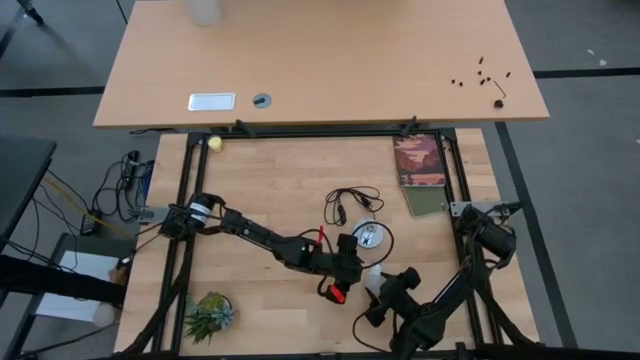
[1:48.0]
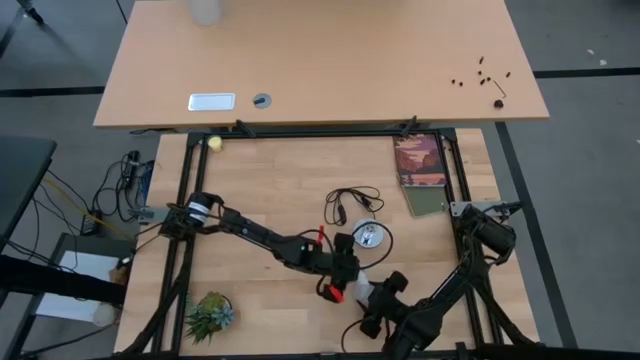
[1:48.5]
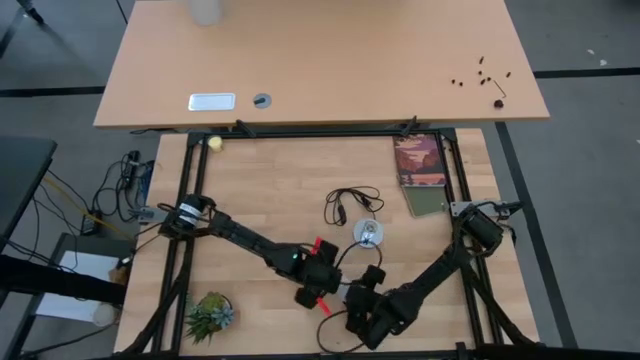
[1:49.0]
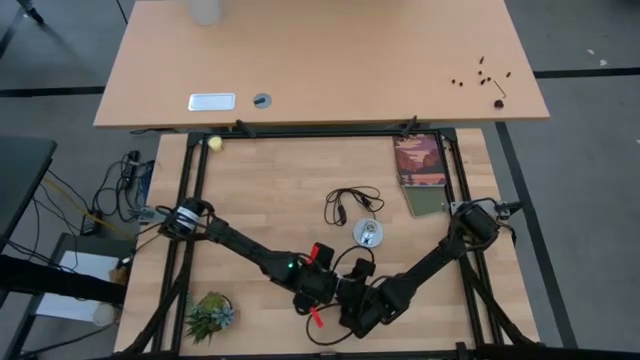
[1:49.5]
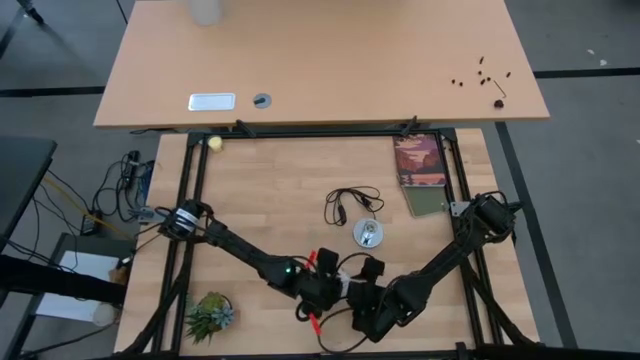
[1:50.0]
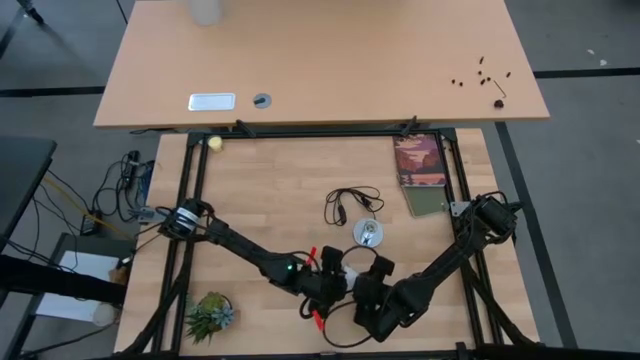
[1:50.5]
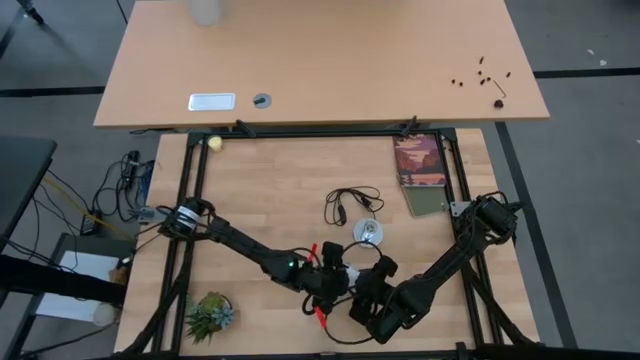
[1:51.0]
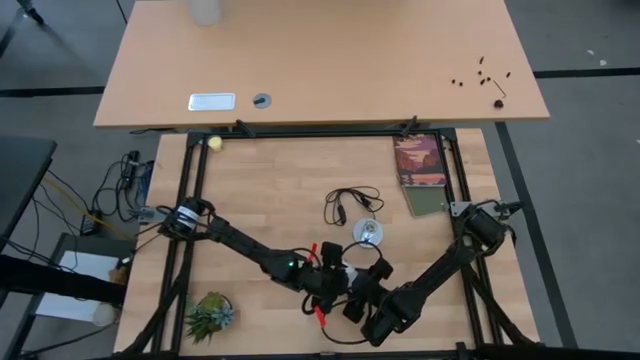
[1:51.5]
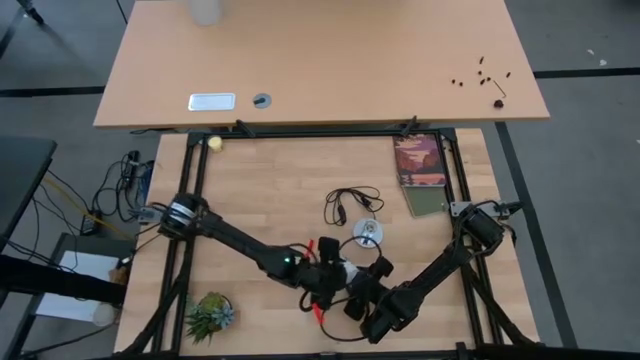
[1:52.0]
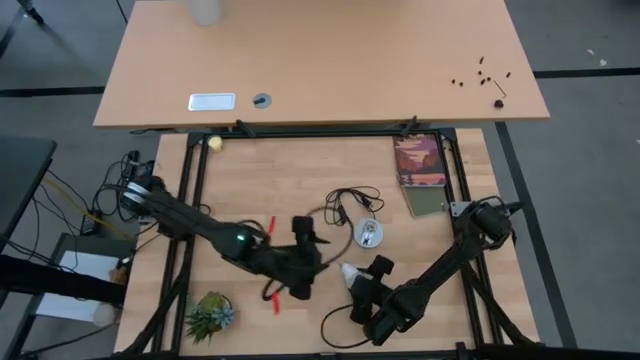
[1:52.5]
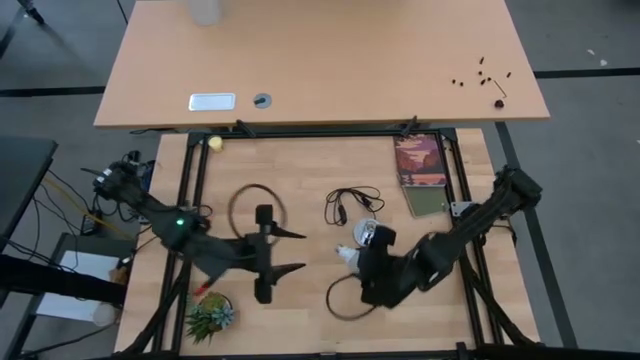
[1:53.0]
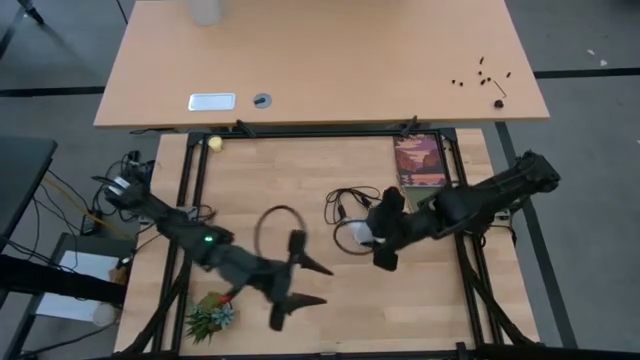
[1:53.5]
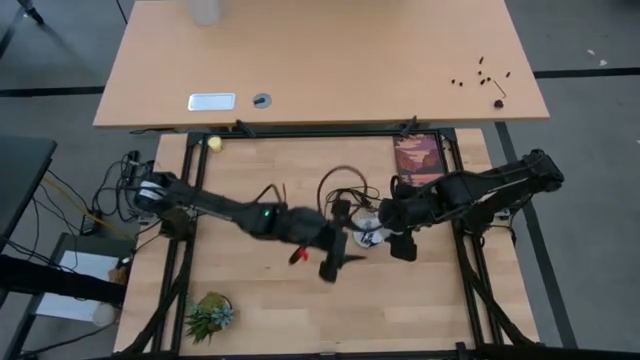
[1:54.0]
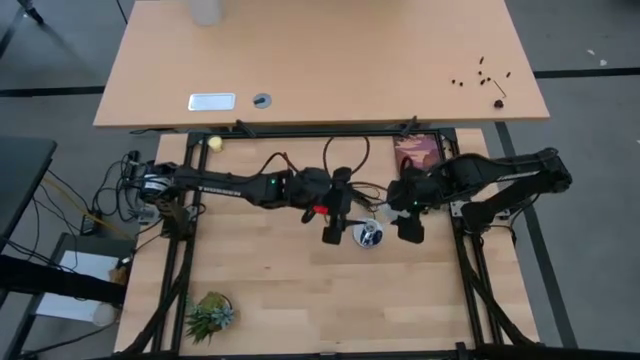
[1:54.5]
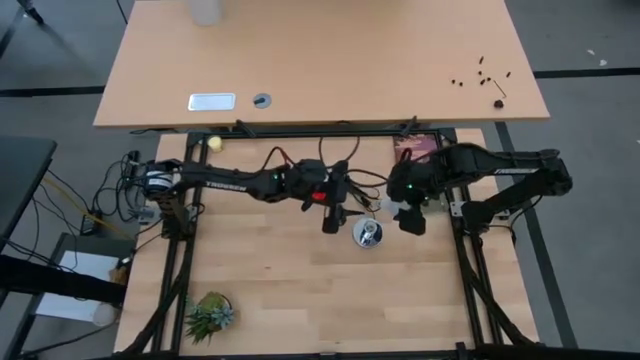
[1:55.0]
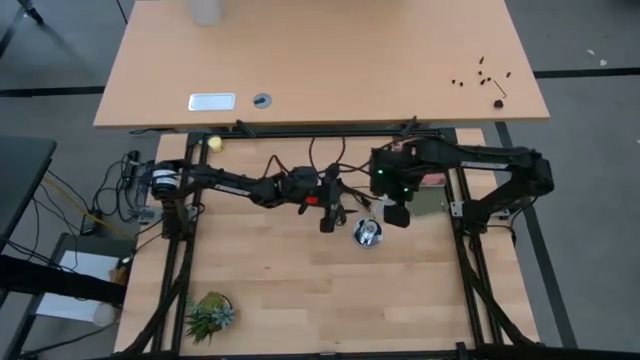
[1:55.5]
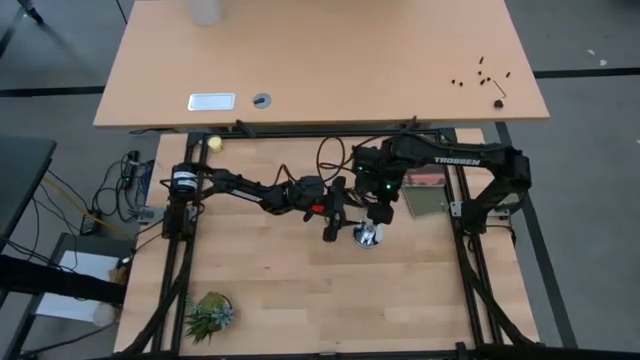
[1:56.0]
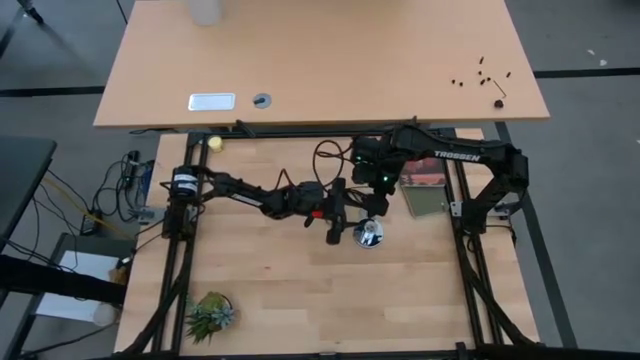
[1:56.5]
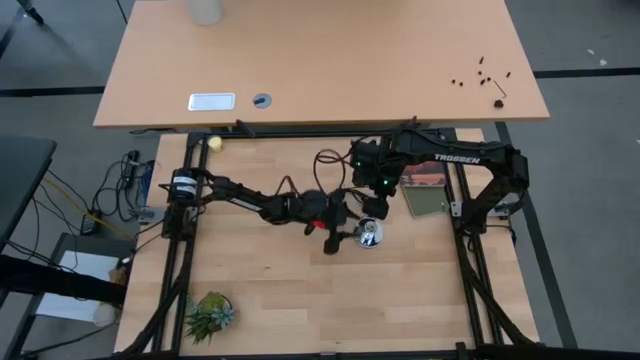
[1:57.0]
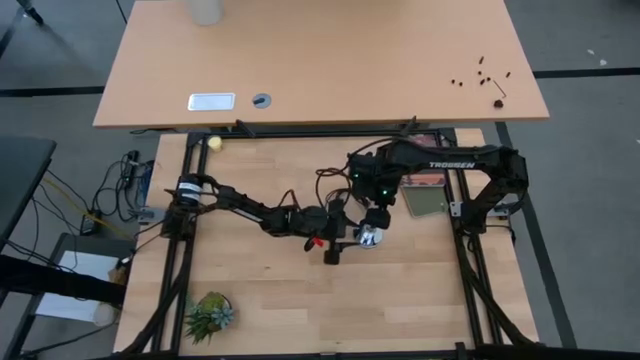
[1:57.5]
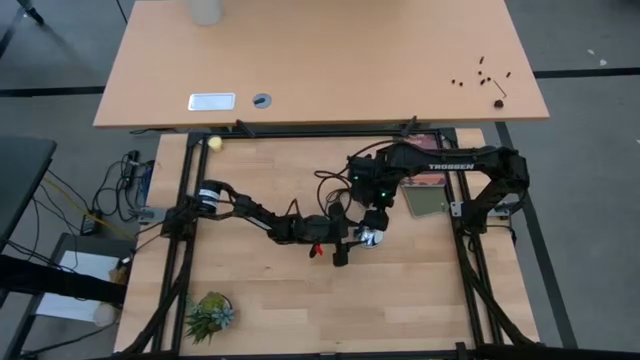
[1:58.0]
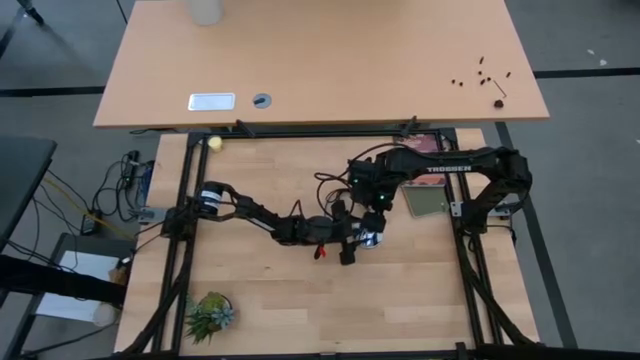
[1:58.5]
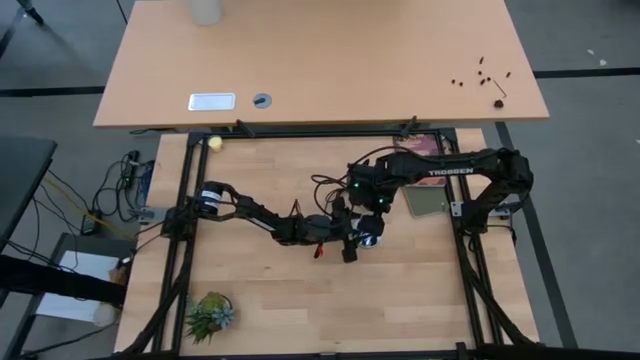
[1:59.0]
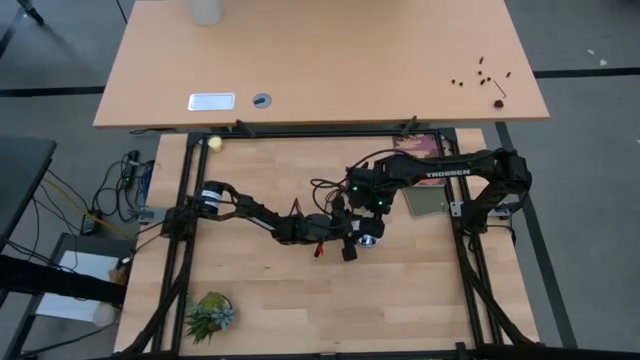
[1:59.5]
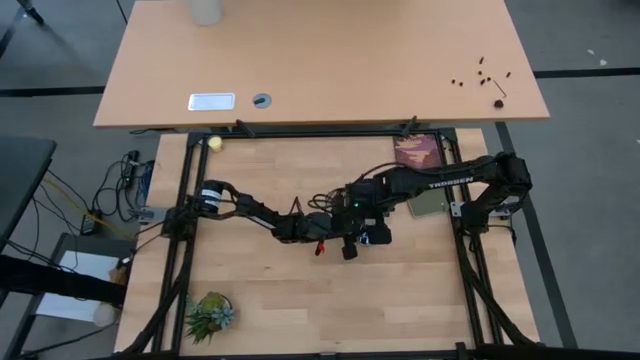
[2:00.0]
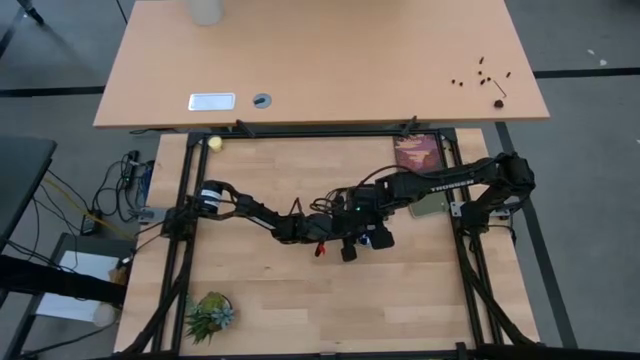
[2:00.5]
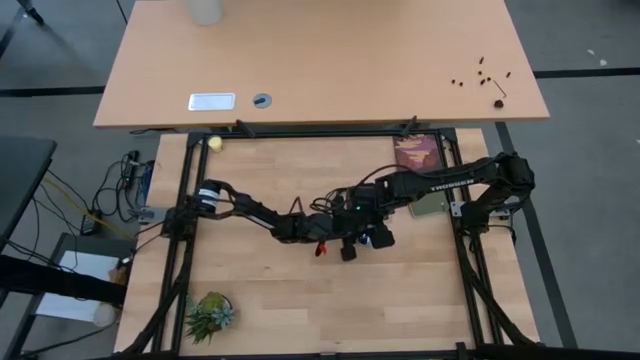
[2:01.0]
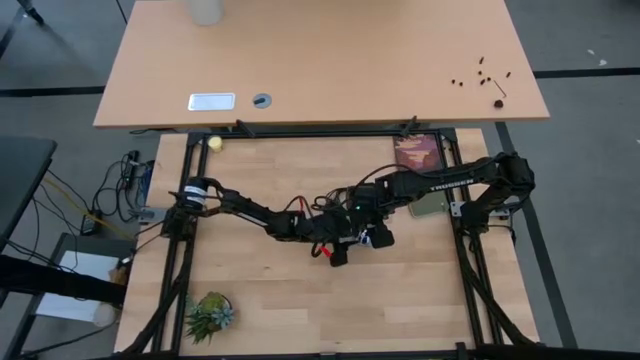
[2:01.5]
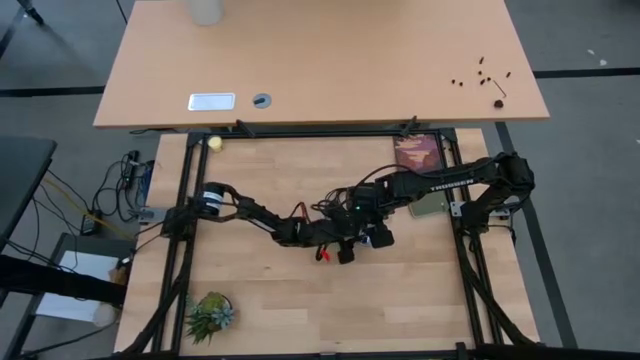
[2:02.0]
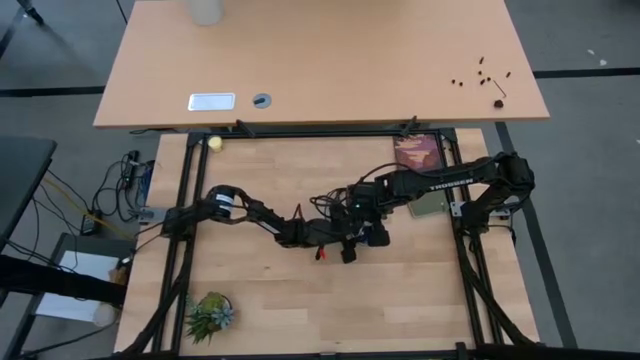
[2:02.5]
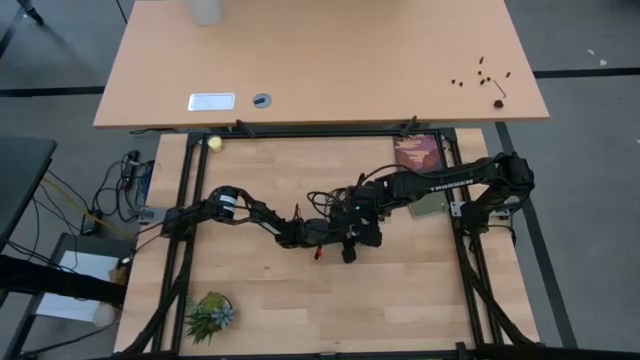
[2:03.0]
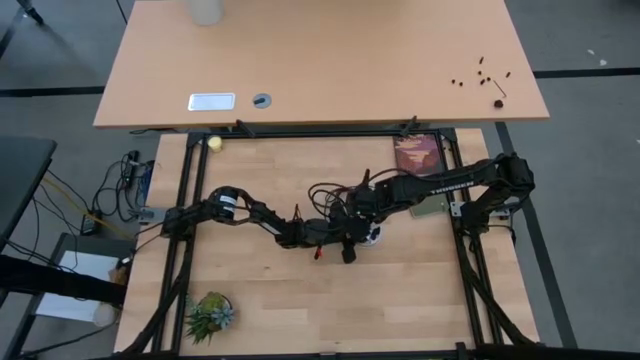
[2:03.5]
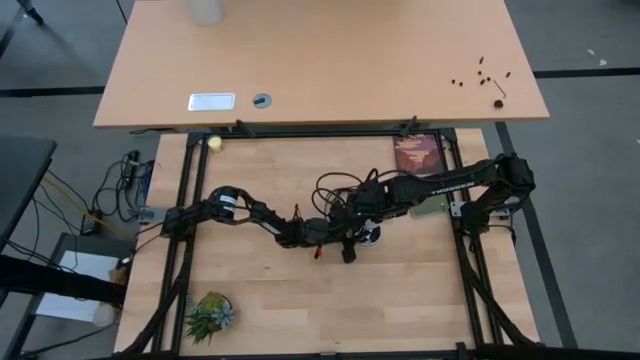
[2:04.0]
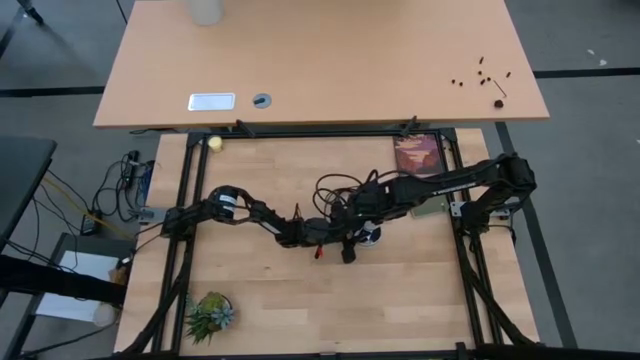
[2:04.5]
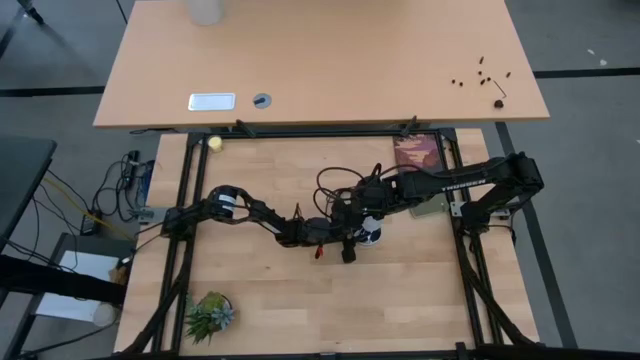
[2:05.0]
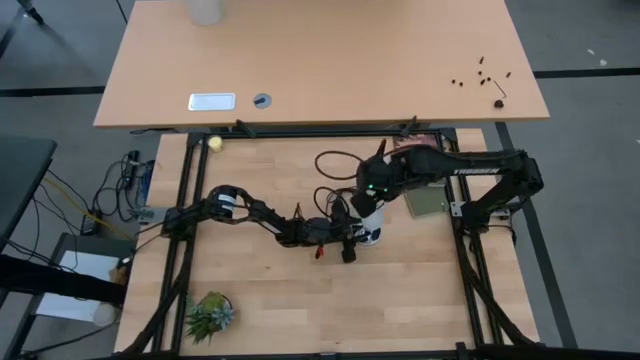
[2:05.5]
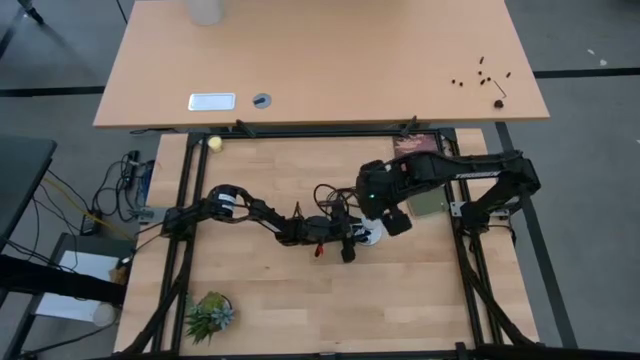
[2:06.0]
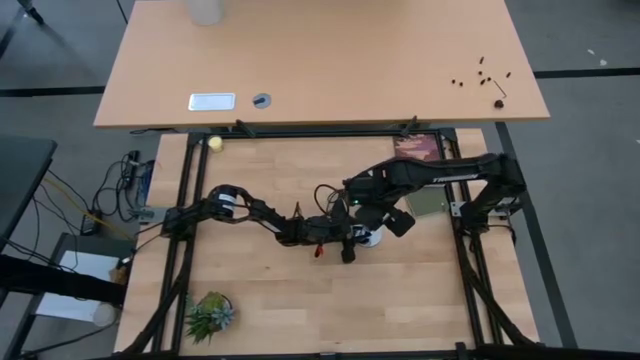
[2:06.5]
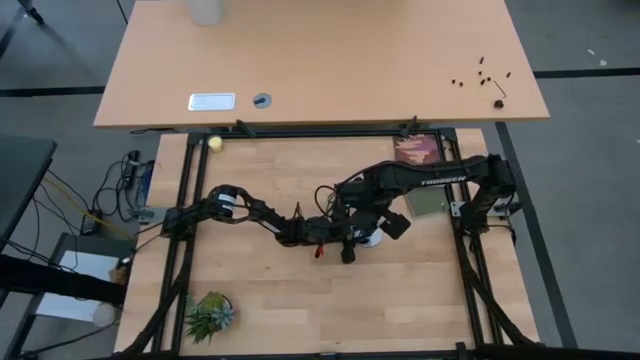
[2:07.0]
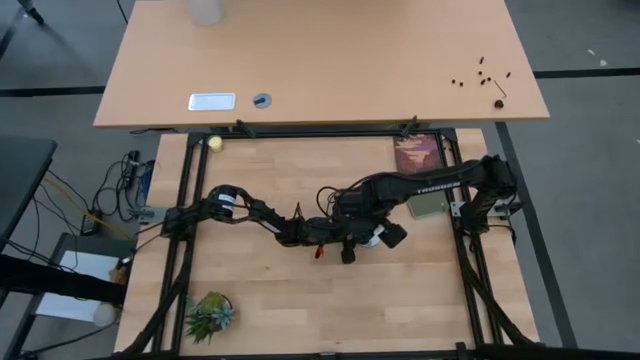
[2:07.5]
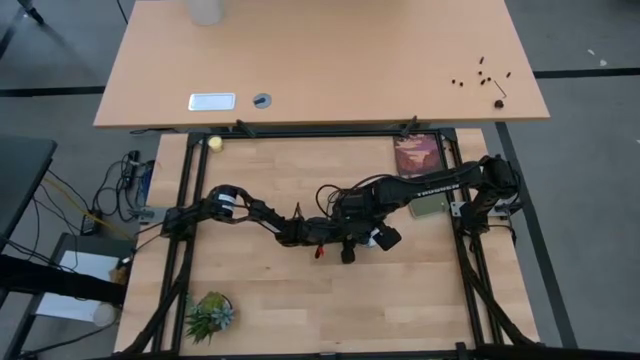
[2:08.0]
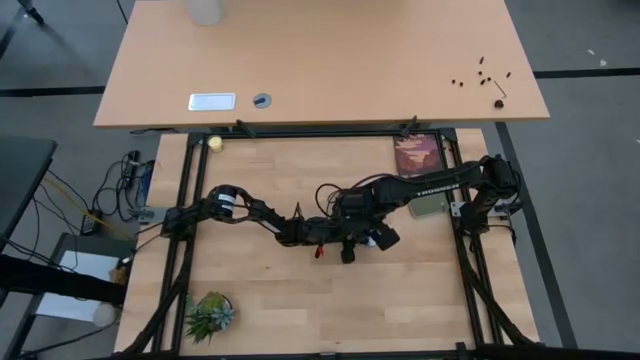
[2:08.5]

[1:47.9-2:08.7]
Task: Screw lightbulb
Insert the lightbulb into the silver lamp

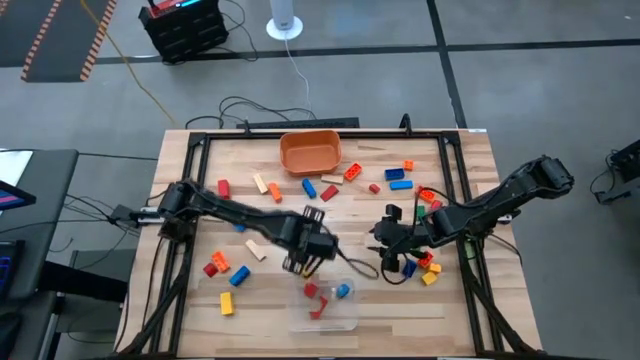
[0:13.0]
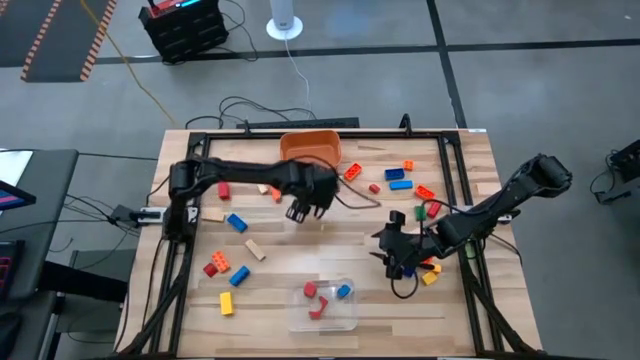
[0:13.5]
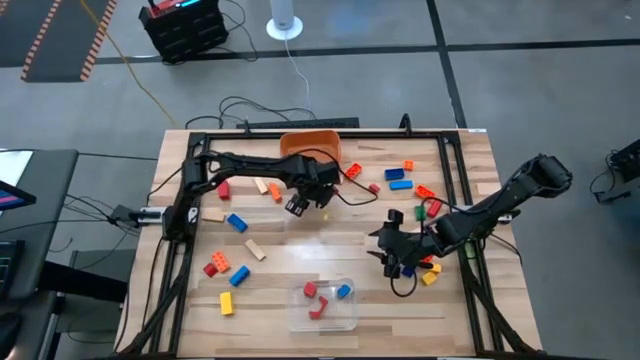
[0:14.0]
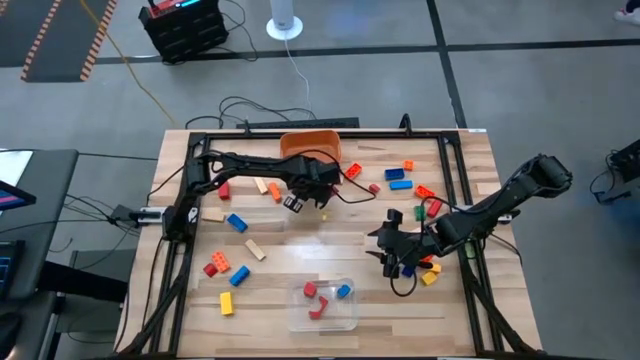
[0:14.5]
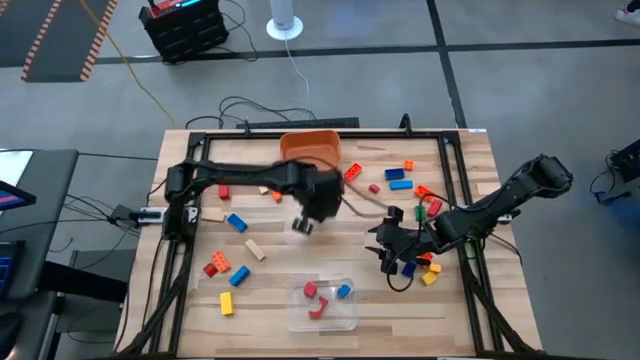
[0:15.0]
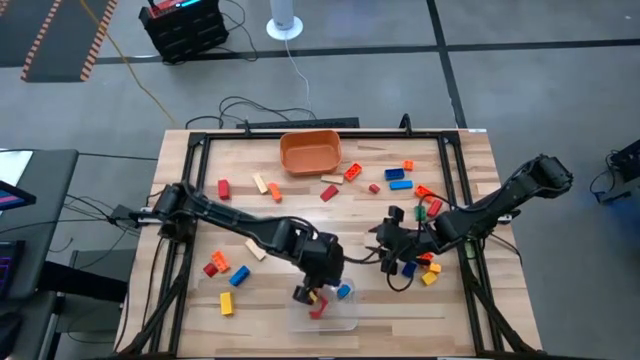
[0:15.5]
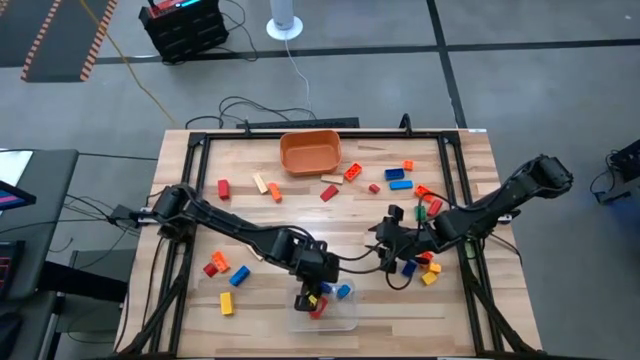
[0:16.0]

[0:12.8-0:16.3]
Task: Sort blocks by size
Put the large blue game piece into the transparent bin
